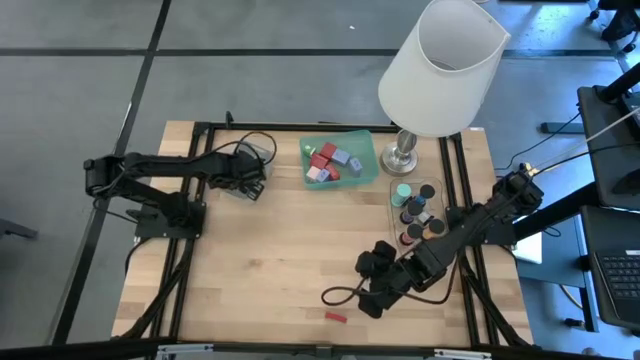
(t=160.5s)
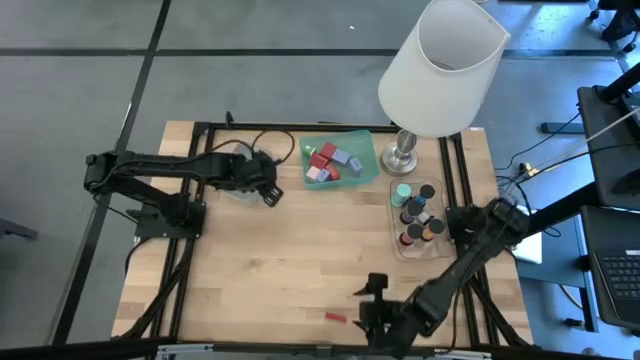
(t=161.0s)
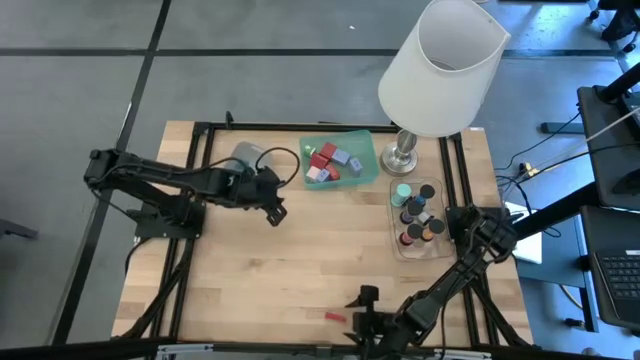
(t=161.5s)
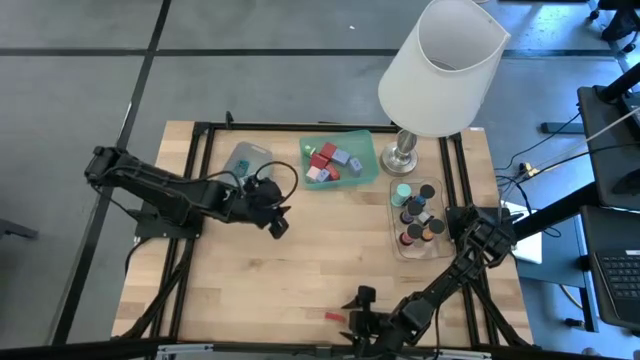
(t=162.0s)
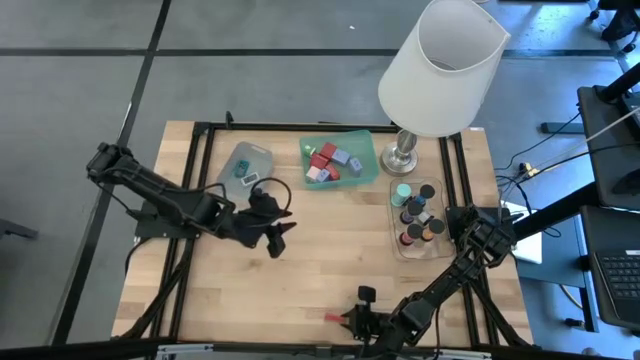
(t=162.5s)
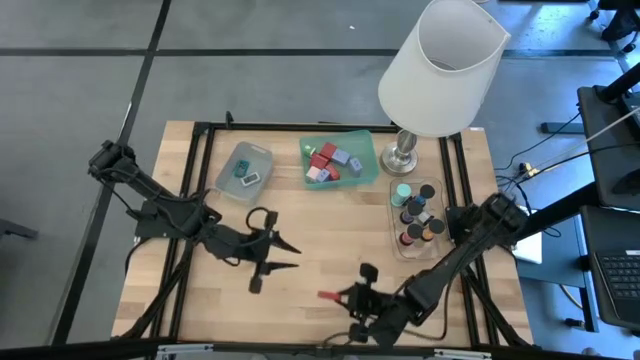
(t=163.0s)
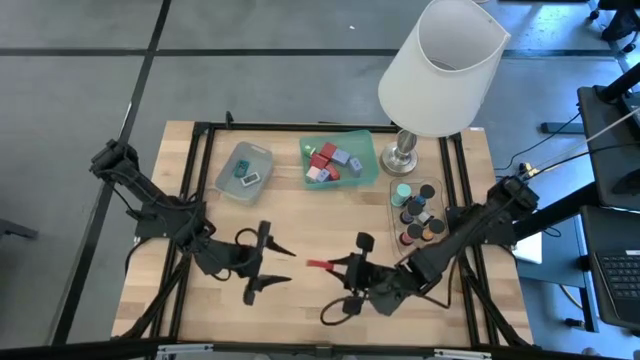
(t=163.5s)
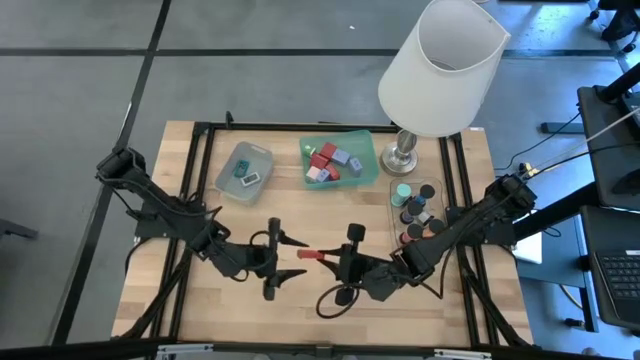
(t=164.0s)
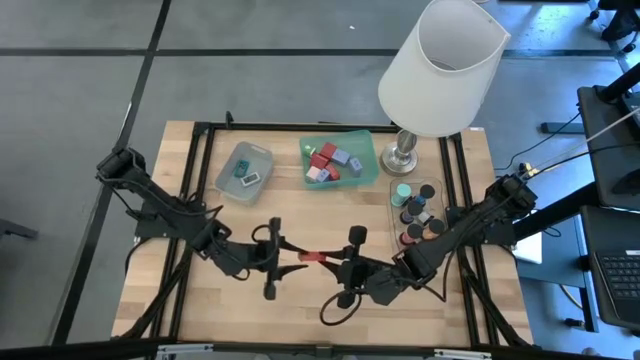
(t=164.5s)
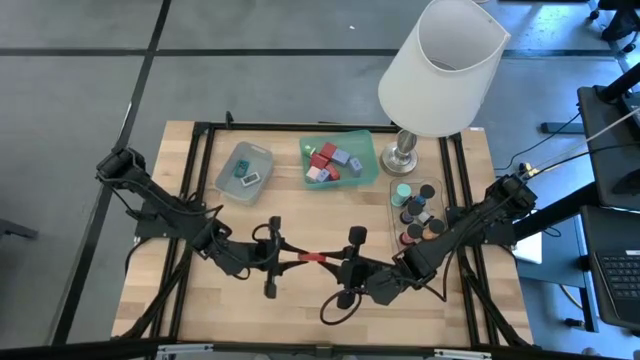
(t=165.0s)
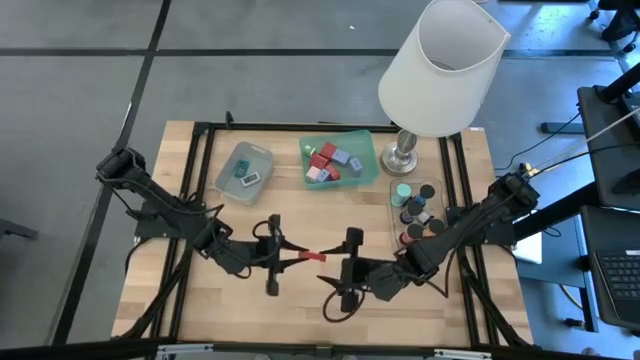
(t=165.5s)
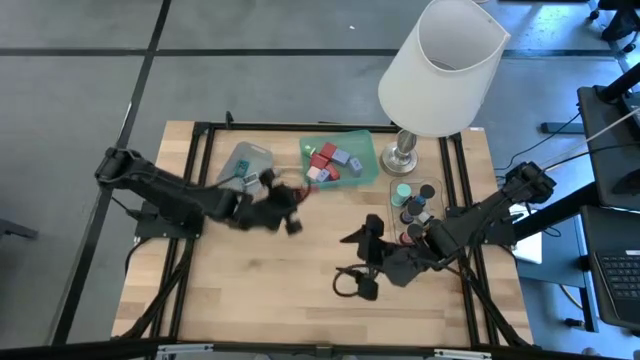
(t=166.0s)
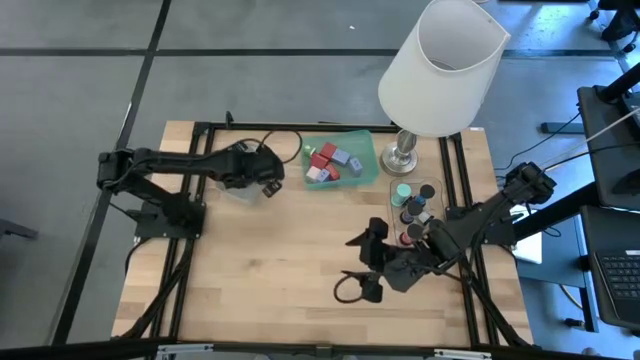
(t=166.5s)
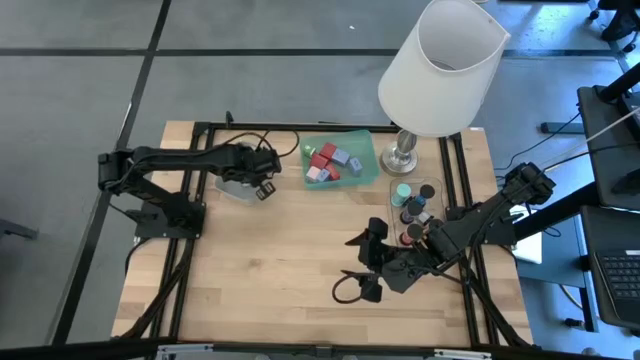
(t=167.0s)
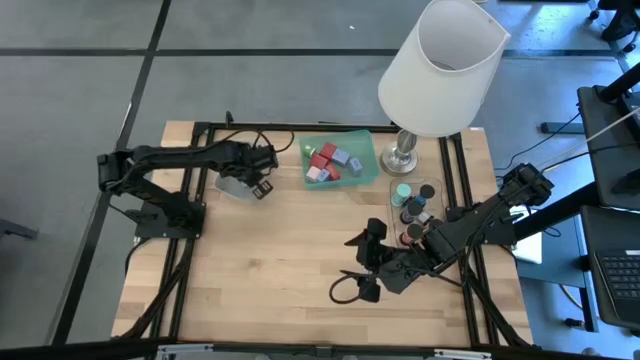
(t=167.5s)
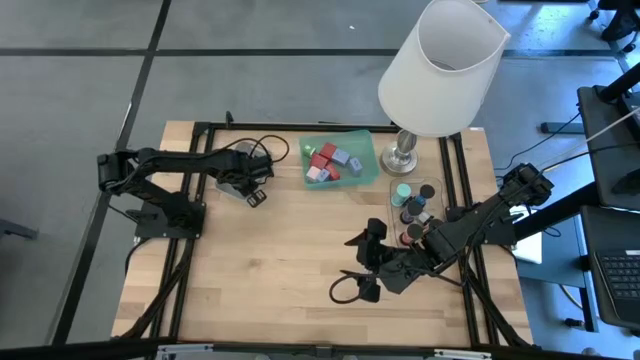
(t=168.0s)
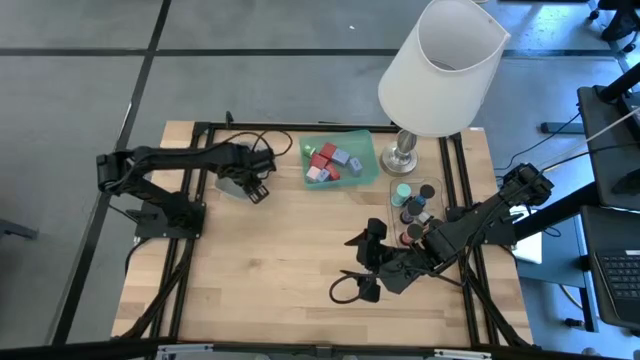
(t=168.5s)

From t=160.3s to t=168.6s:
Task: Pick & Place Office items
Put the red digital clock into the gray bin

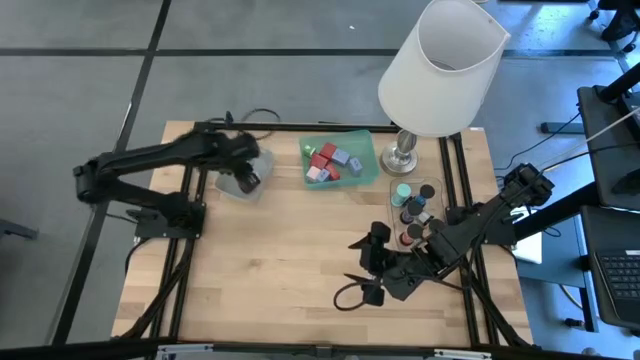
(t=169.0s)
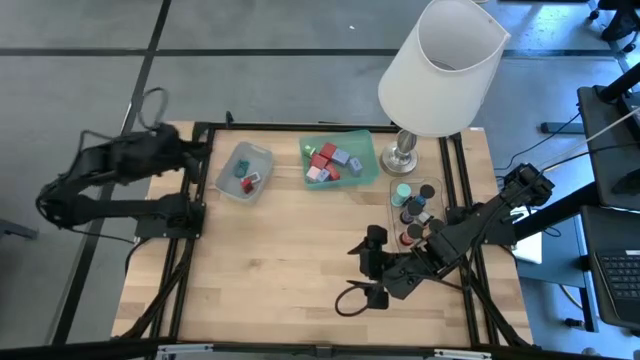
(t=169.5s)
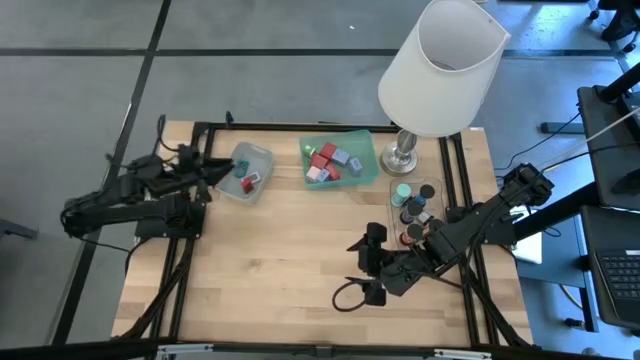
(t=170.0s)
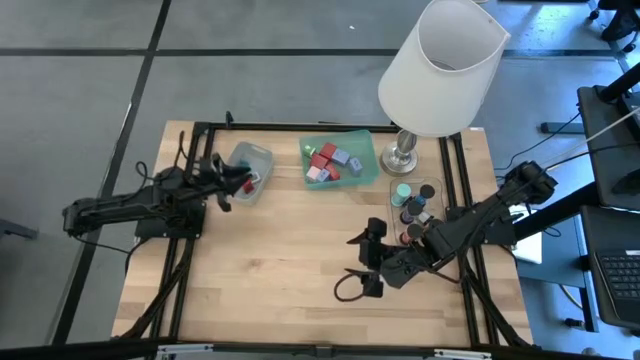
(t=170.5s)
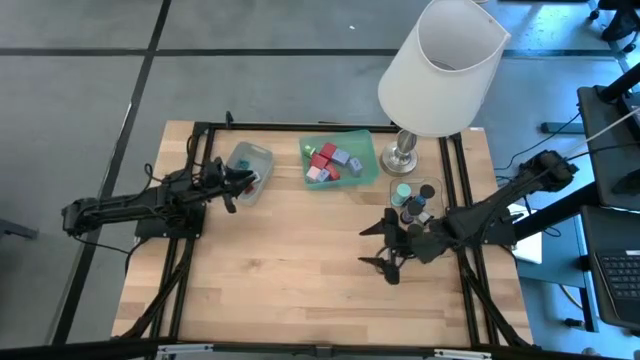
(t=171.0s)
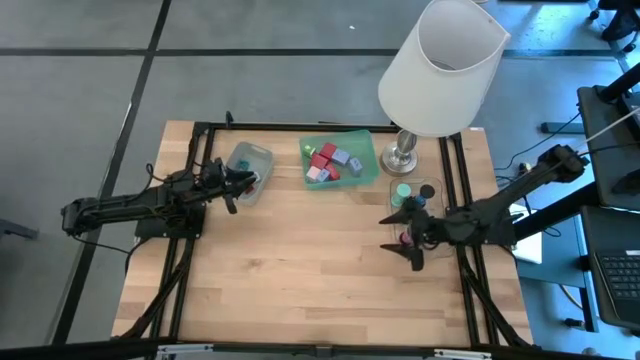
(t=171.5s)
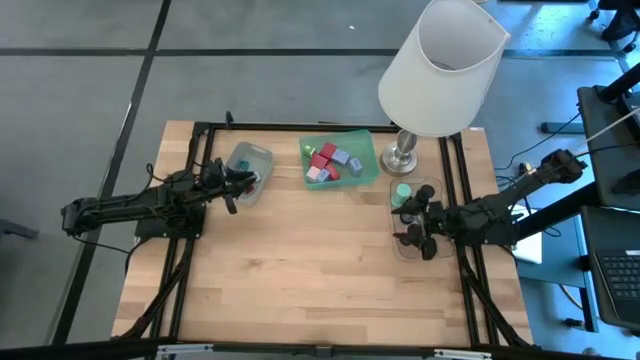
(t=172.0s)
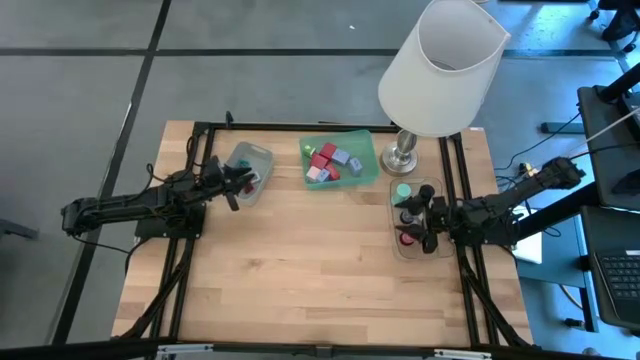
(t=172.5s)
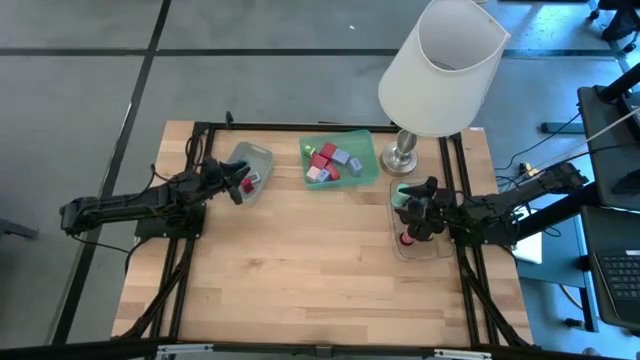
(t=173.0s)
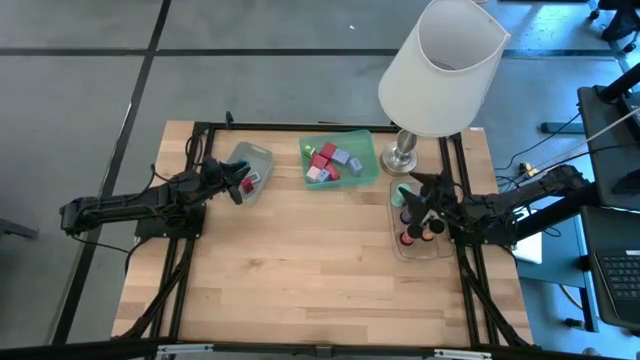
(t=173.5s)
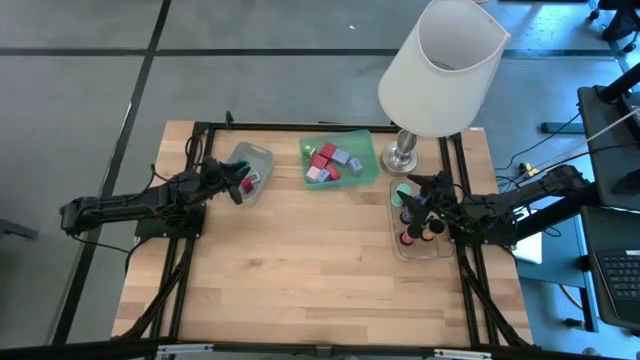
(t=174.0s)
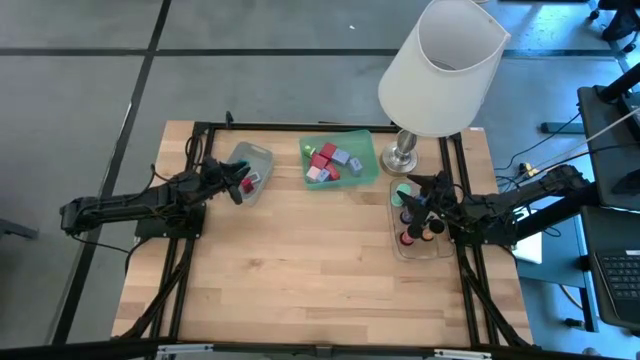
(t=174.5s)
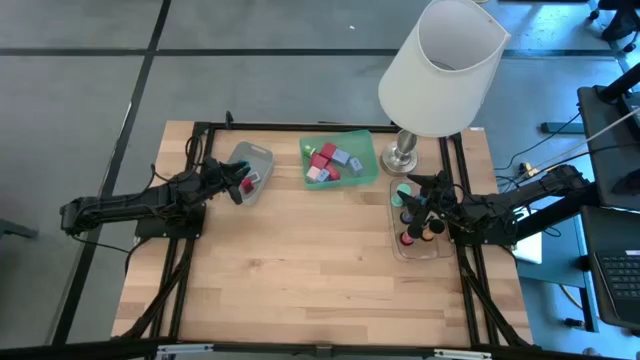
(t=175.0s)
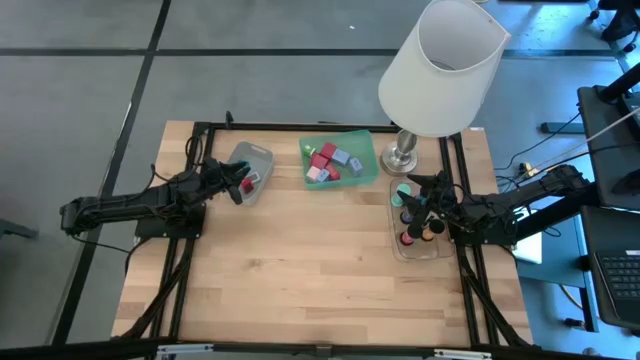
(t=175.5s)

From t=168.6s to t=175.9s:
Return to Home Position

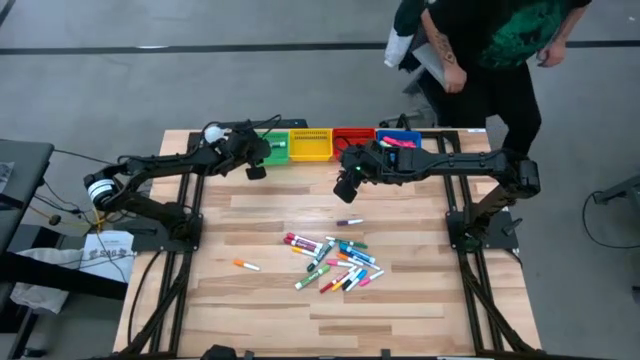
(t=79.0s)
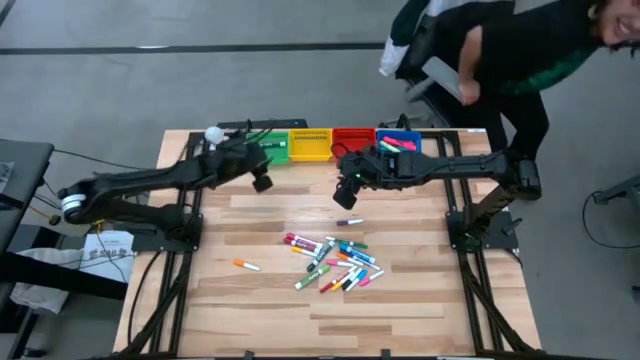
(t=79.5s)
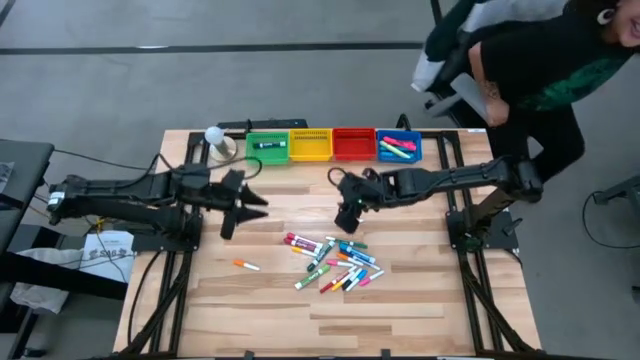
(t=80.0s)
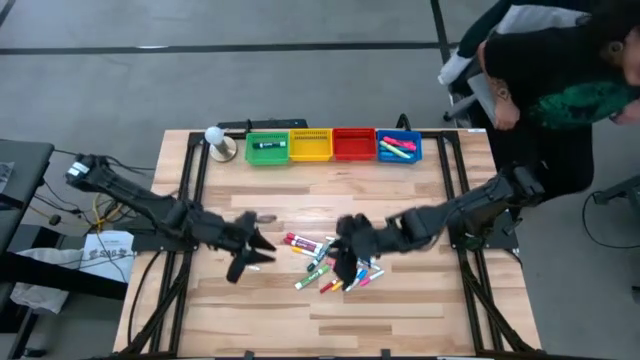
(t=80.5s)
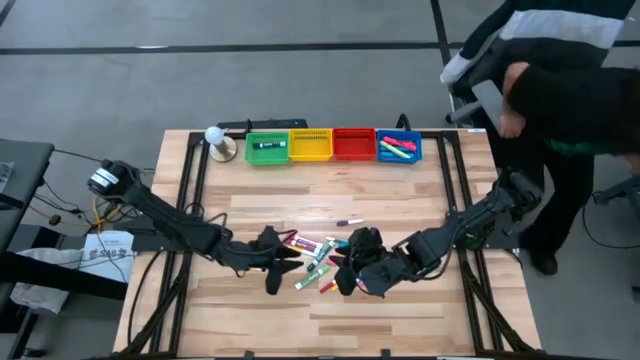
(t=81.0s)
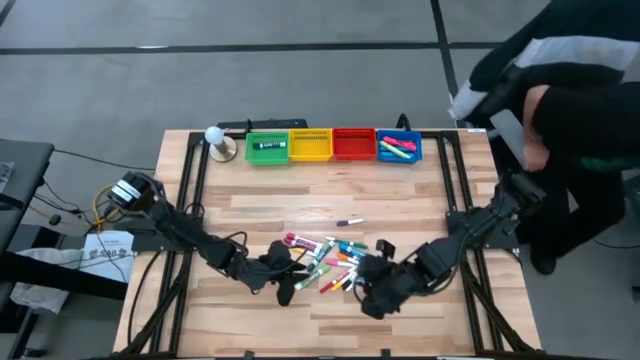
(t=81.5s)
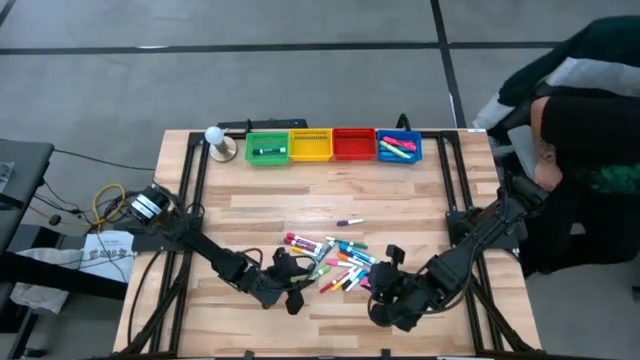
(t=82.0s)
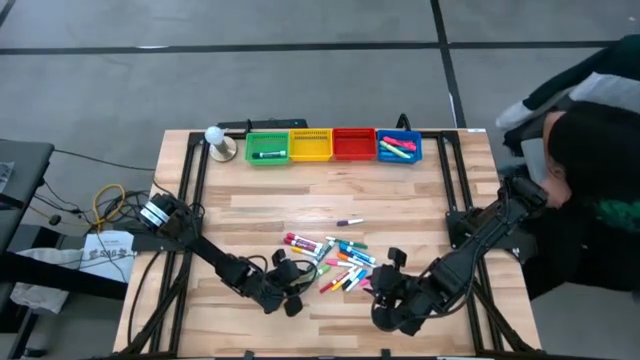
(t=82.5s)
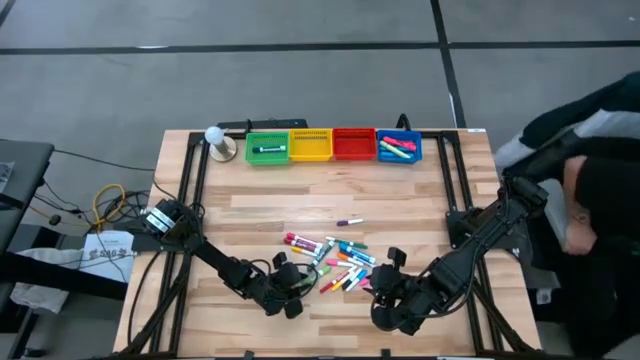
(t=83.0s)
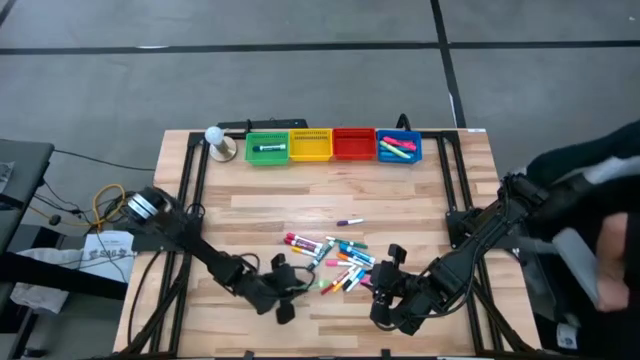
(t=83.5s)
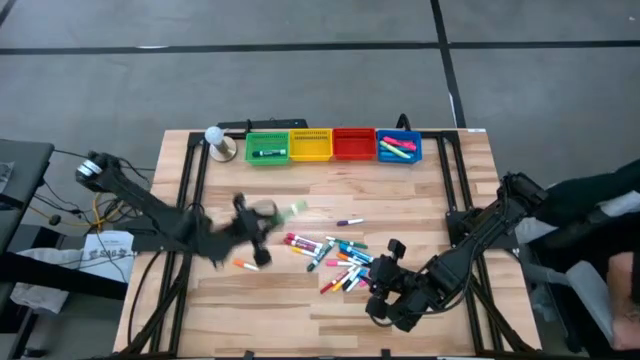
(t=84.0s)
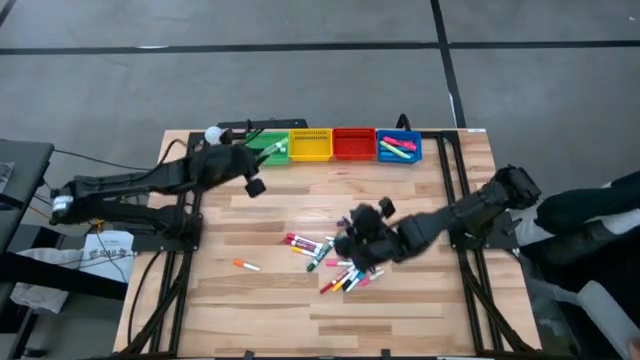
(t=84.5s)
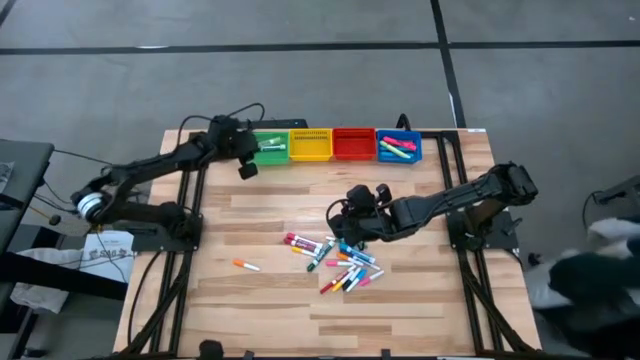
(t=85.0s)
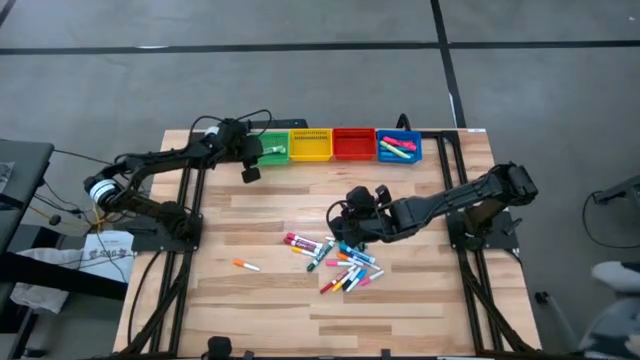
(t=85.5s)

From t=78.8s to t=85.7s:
Task: Pick & Place Markers
Put the light green marker pen into the green basket
